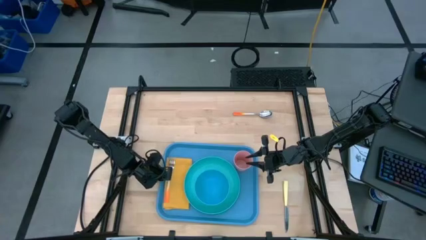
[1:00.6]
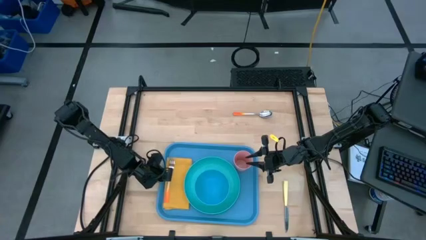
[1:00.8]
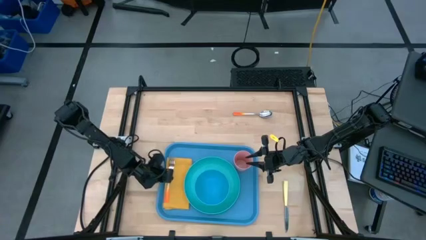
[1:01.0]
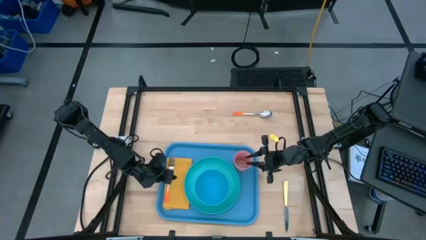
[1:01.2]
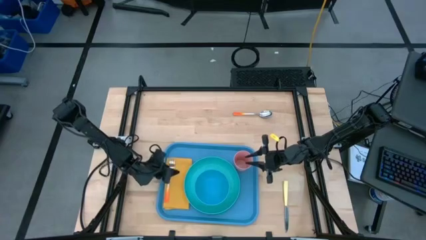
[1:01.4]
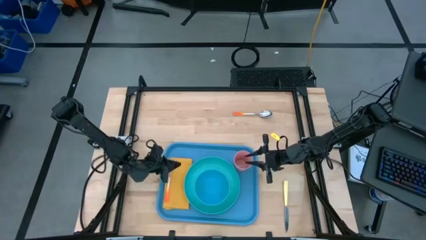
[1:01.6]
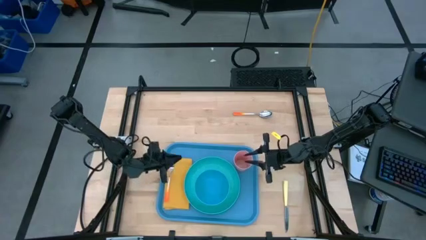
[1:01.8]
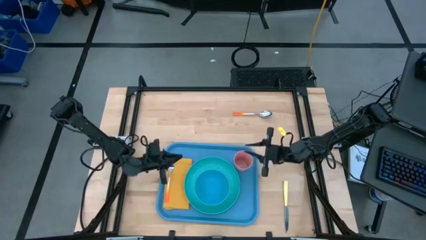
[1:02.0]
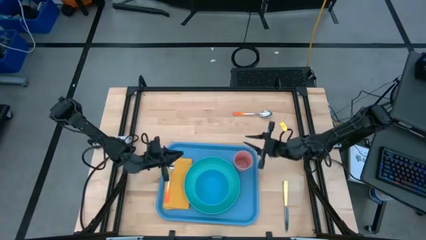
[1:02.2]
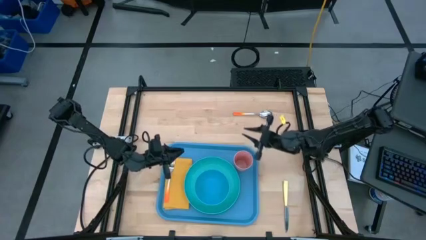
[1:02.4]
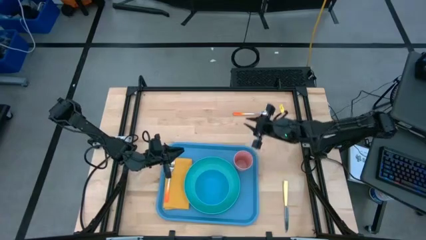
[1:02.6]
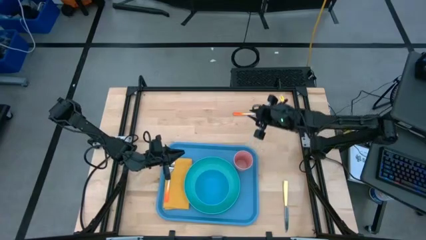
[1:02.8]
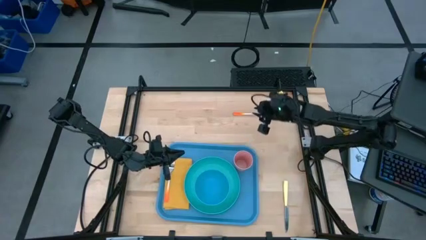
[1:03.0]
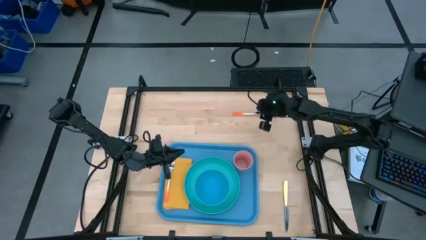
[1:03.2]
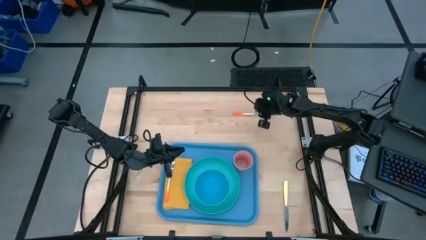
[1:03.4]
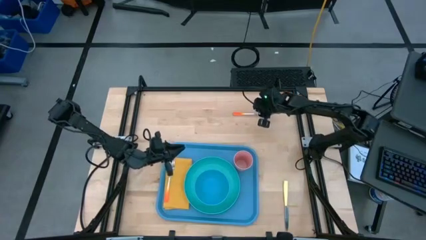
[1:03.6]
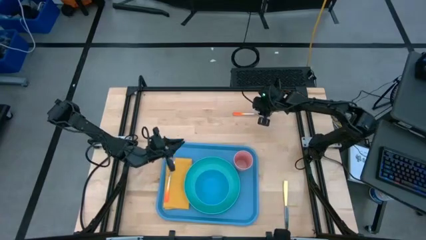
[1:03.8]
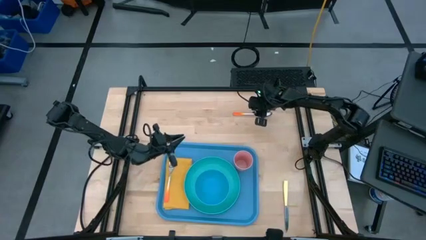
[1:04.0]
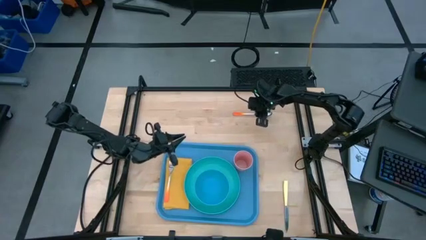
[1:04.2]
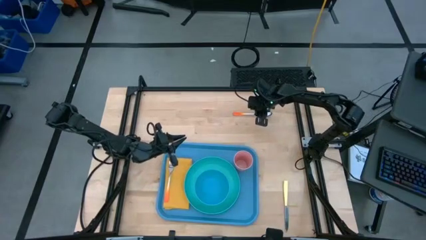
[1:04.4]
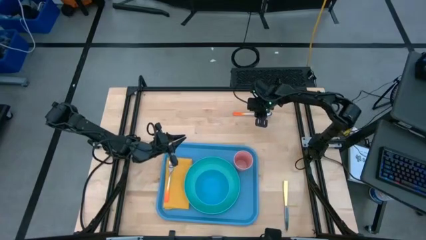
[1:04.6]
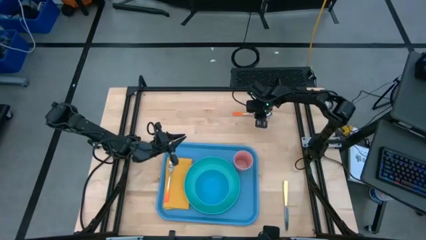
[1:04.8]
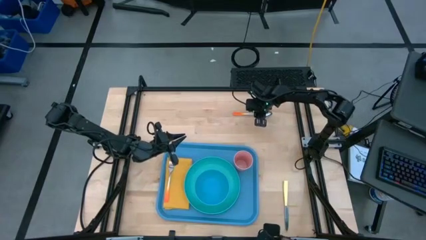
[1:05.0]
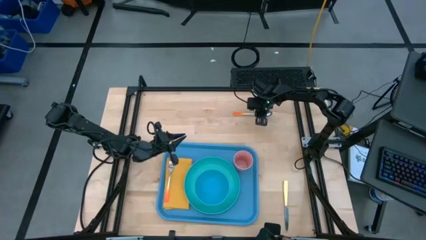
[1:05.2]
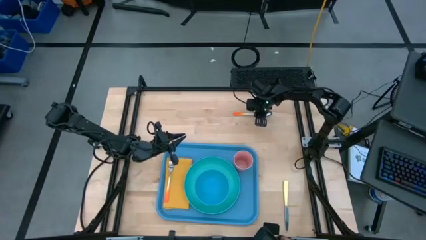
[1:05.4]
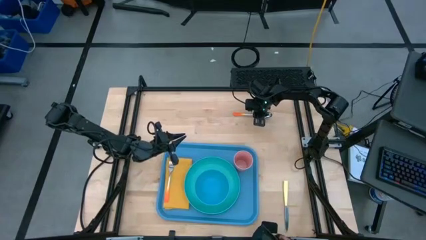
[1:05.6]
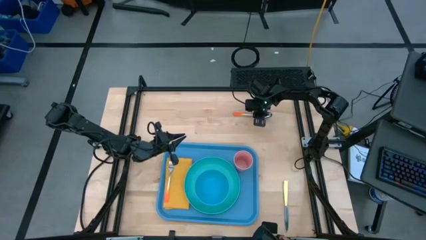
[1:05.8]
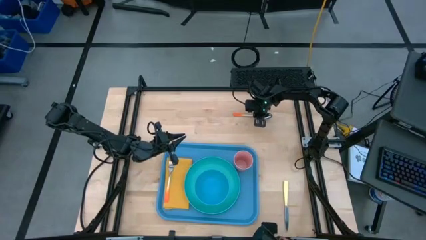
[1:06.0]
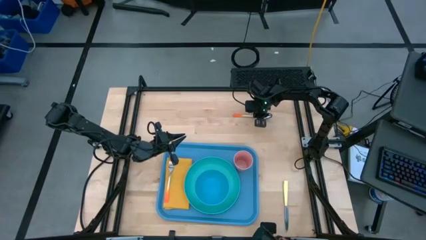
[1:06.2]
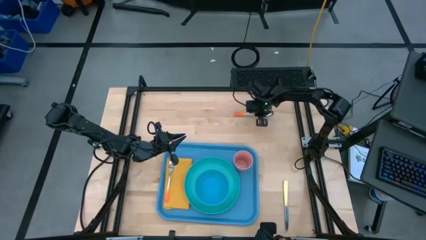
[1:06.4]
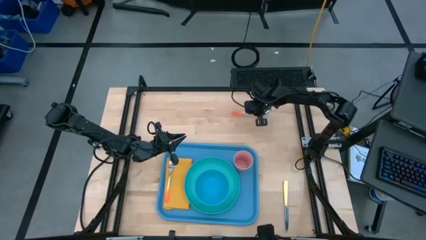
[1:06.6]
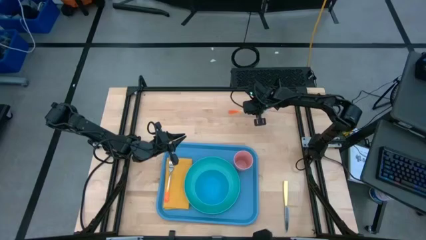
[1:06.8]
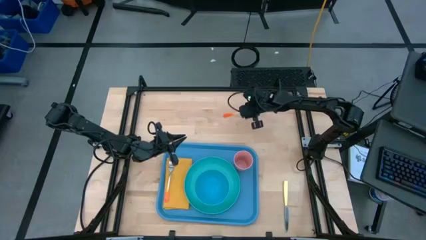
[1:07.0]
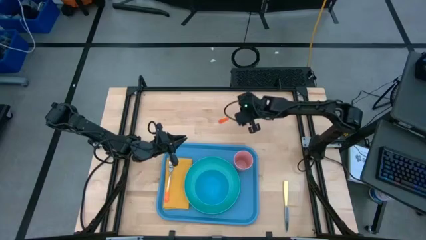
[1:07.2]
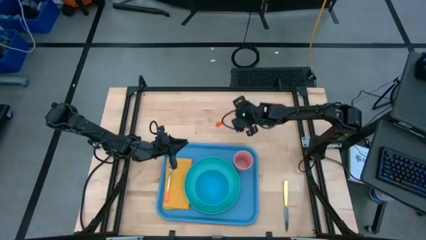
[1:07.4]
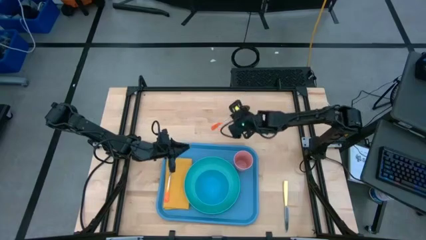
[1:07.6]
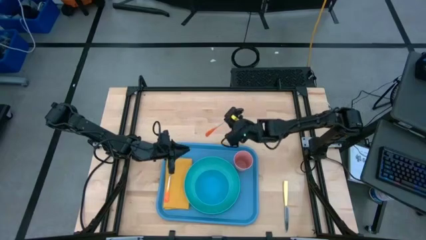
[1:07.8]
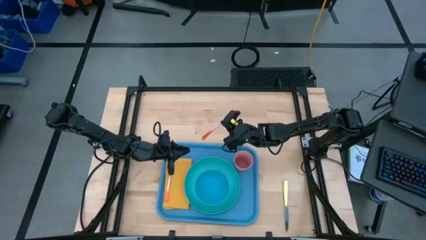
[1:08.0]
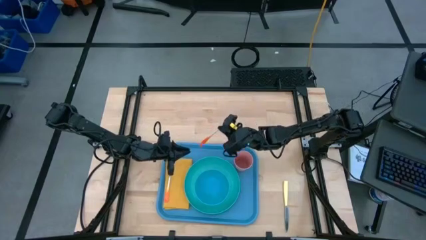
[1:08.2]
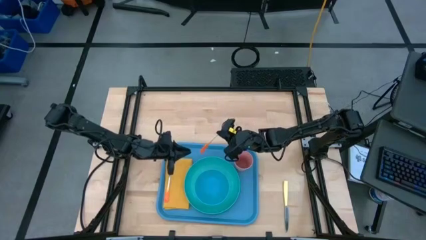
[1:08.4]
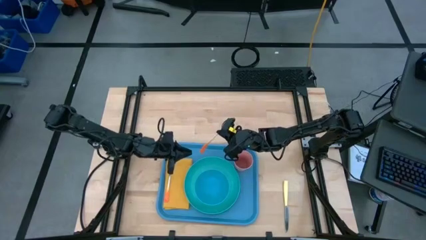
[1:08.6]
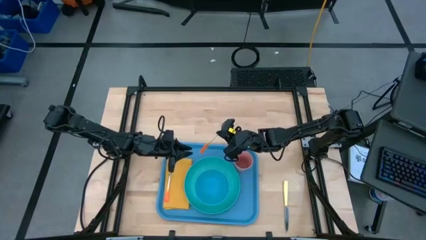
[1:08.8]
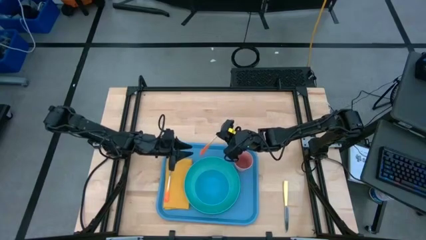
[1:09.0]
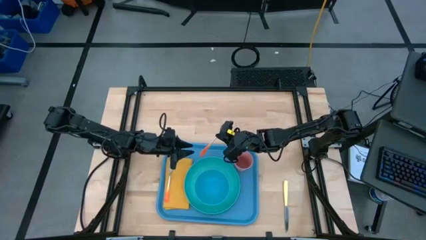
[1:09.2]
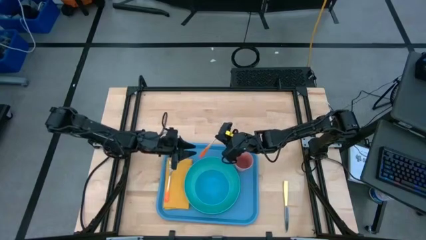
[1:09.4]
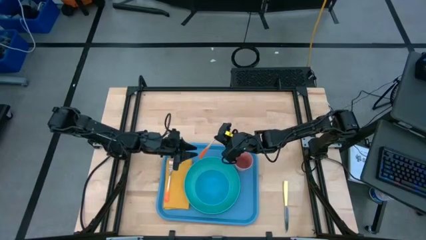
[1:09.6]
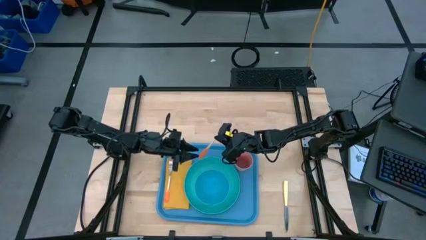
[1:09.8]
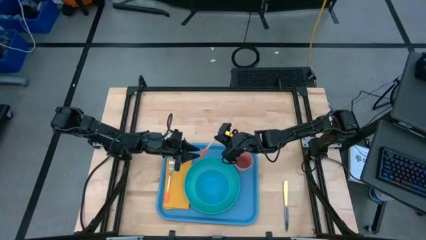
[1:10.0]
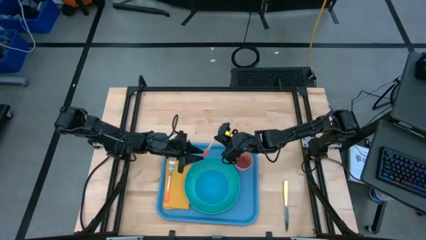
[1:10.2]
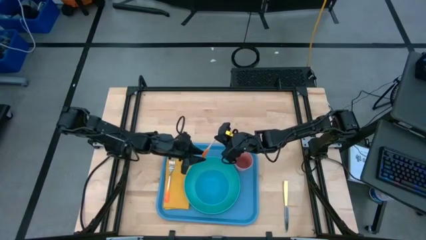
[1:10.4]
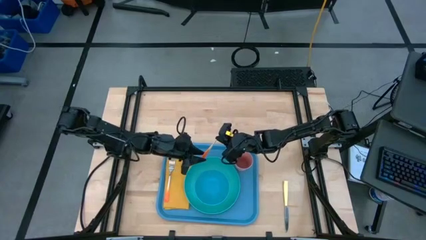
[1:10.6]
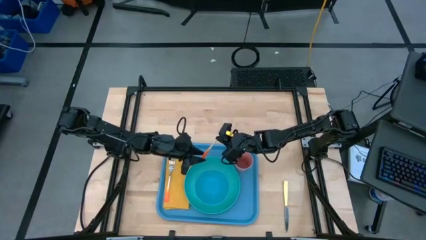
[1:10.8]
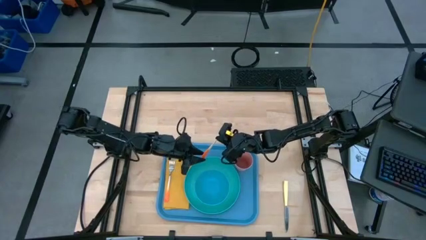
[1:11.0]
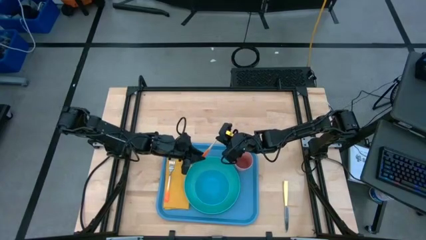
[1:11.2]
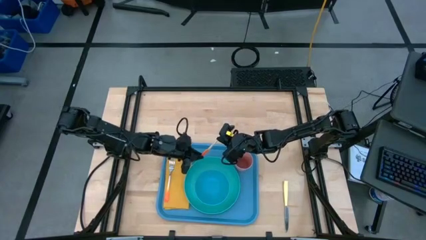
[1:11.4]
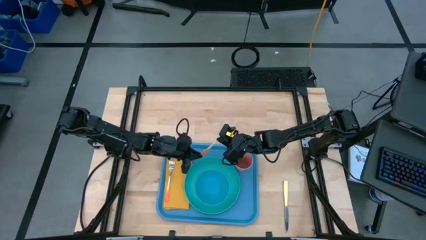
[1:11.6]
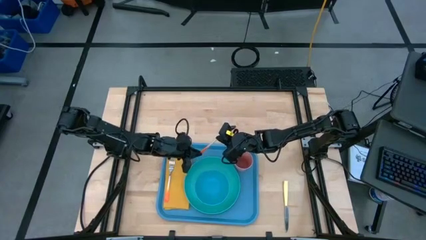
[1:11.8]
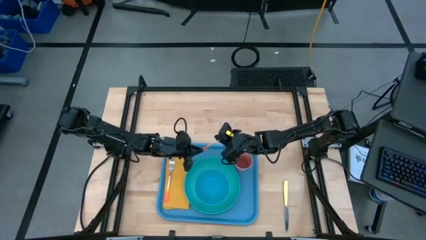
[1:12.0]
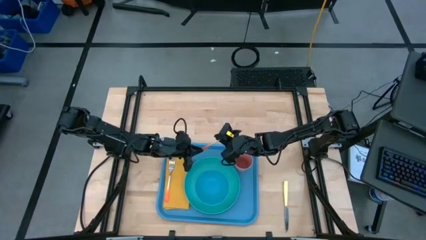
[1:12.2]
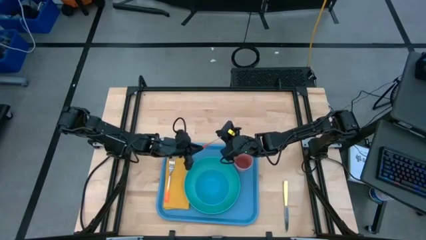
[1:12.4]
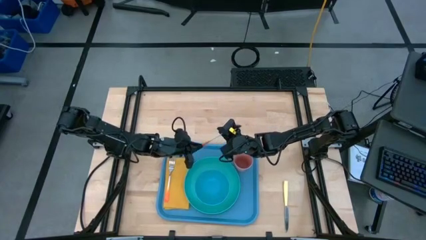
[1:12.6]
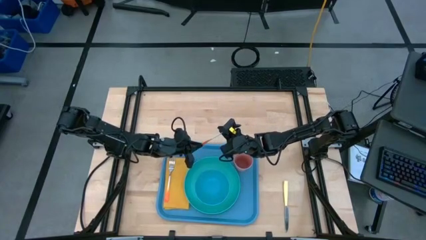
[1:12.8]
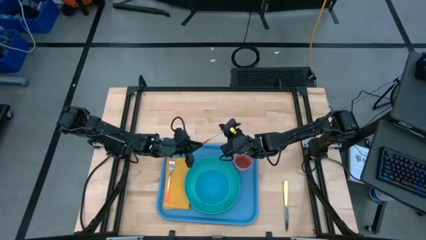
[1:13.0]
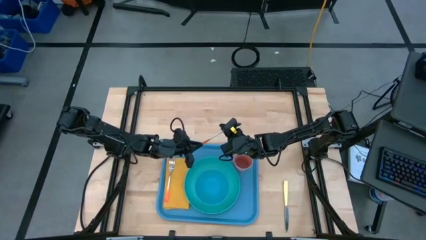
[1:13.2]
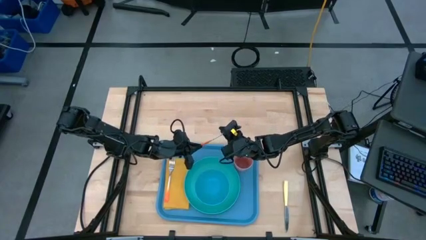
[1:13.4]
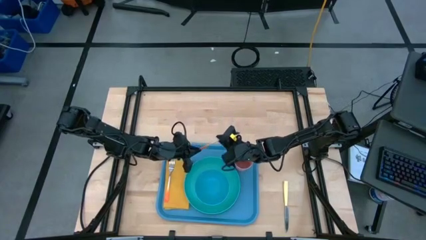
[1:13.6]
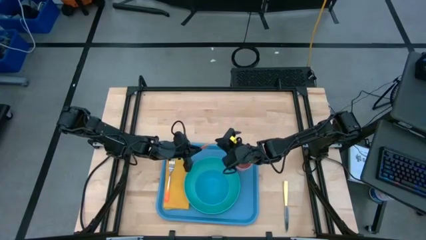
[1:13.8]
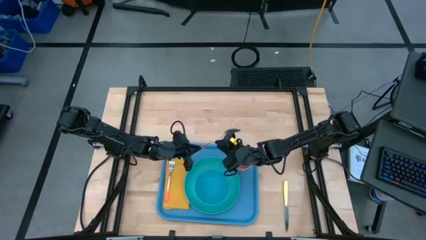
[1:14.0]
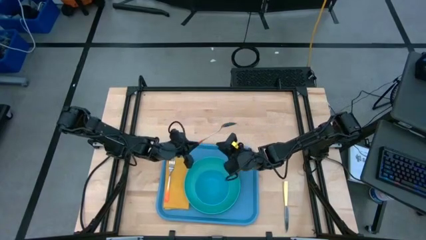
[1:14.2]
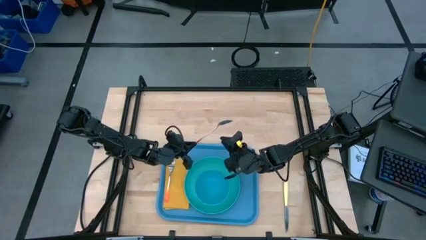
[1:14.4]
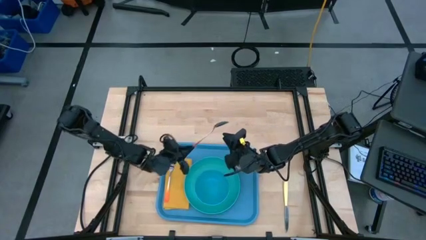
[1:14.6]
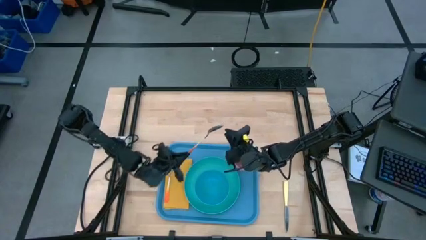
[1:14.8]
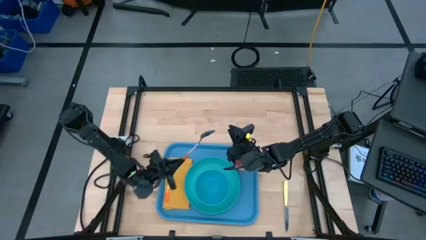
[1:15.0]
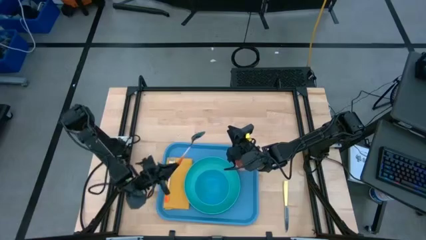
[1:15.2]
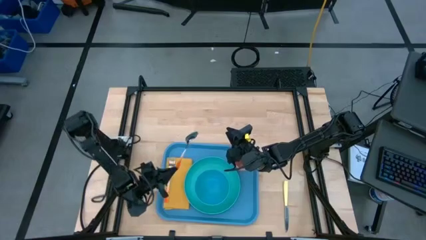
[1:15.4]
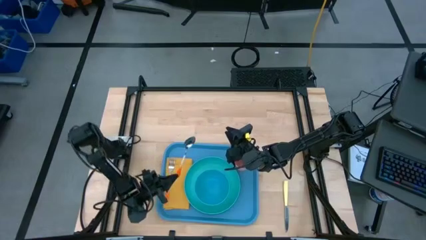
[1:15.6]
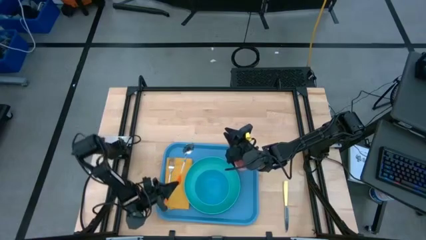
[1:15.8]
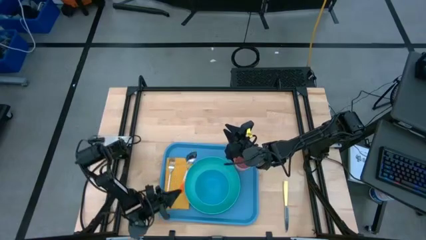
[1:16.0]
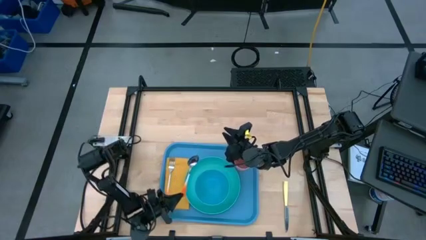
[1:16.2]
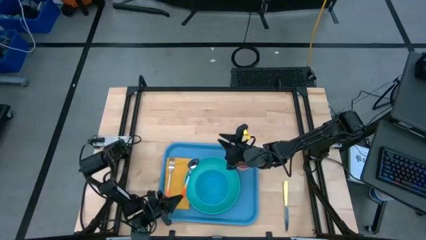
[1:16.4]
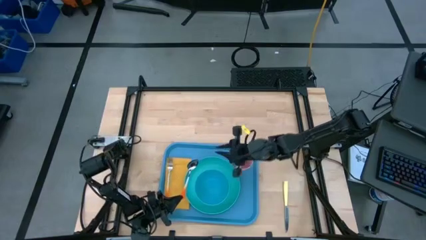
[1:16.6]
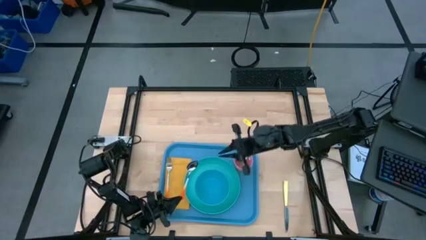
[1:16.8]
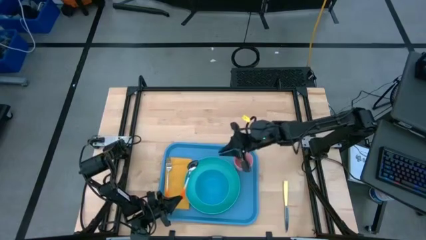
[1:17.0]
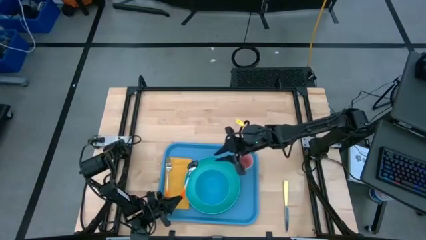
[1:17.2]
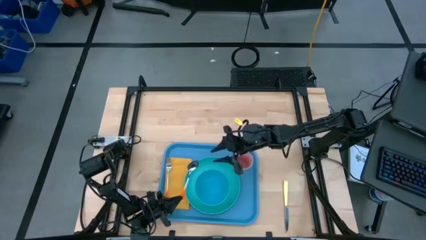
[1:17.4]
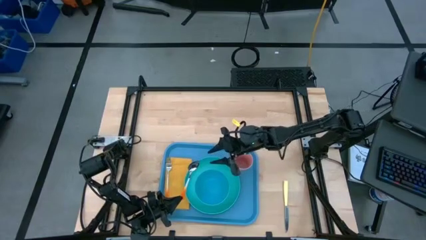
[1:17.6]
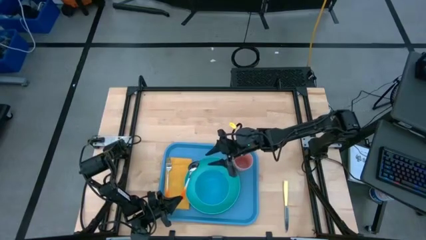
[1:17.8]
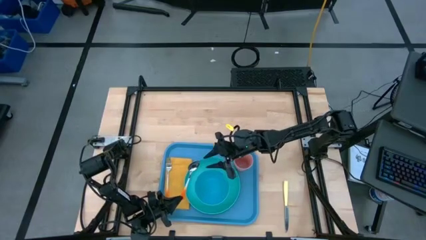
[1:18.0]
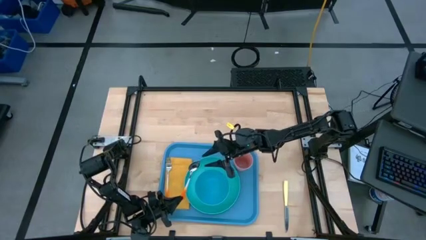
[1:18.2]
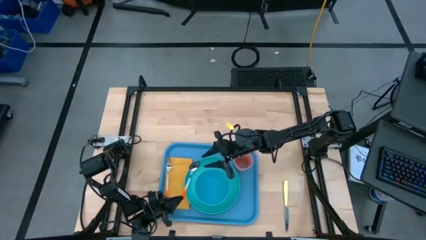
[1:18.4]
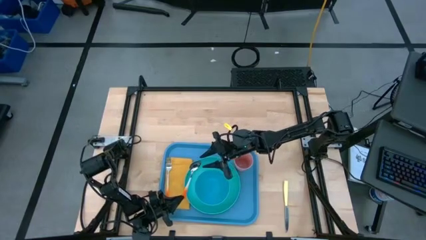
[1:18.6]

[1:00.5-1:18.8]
Task: Set up tray
Put the orange spoon on the yellow napkin to the right of the orange fork
